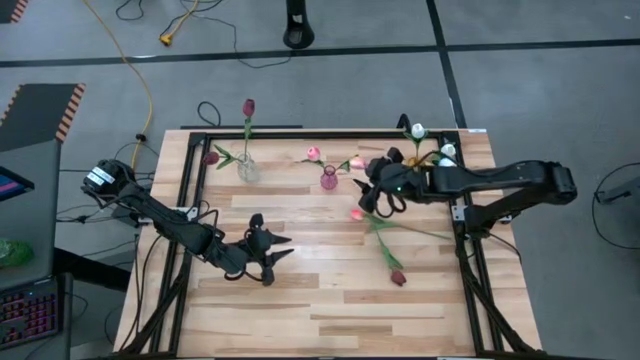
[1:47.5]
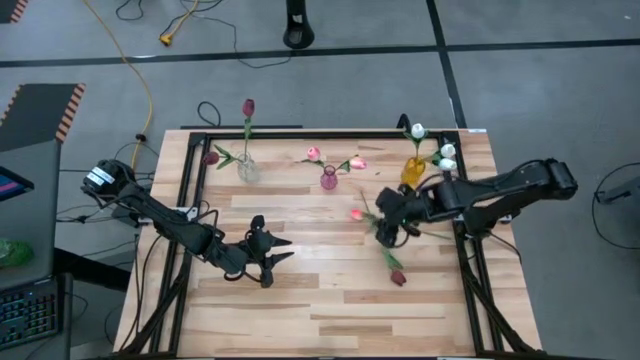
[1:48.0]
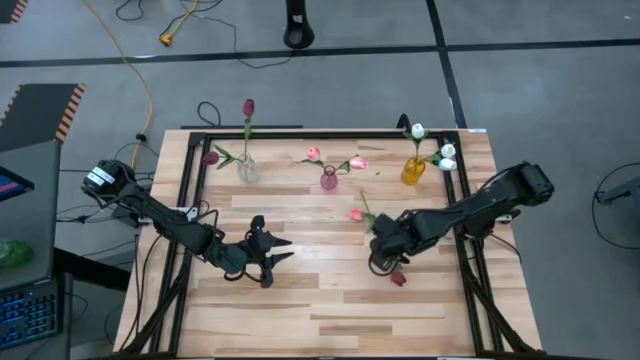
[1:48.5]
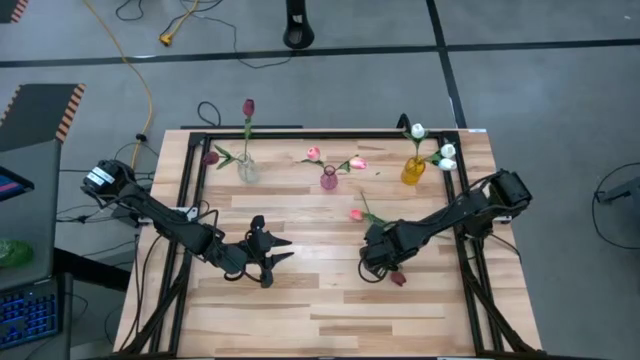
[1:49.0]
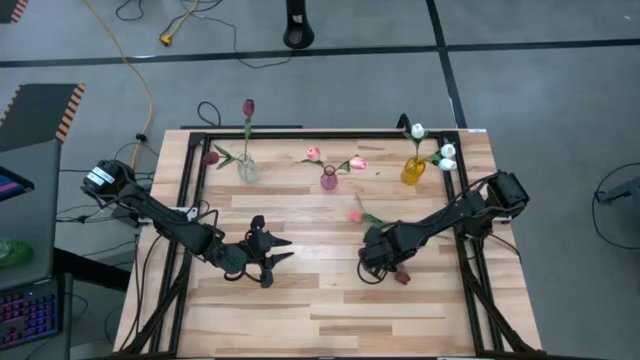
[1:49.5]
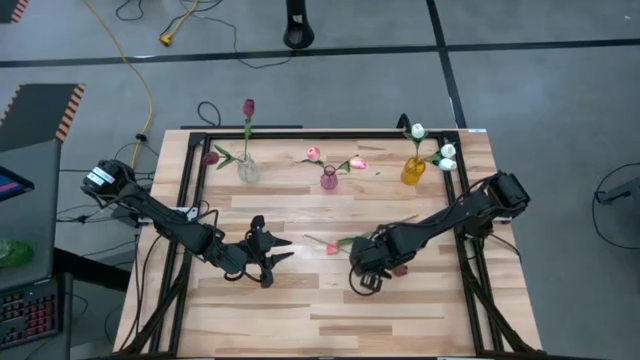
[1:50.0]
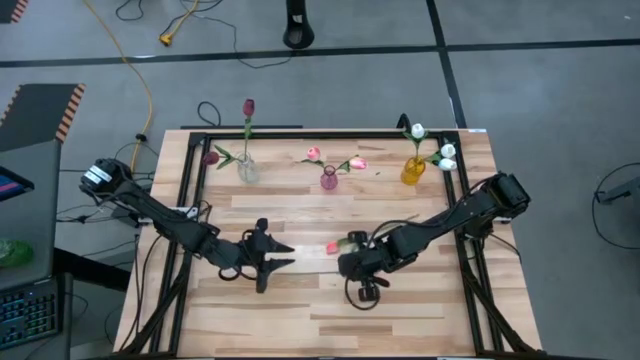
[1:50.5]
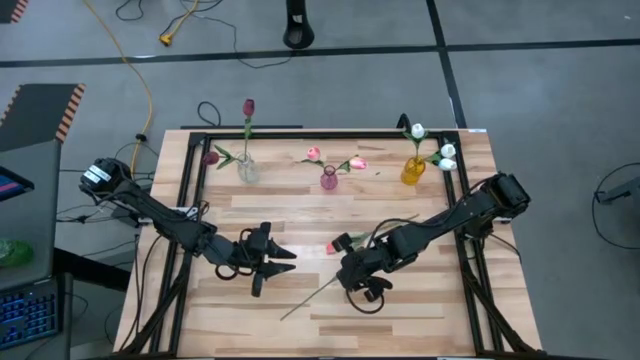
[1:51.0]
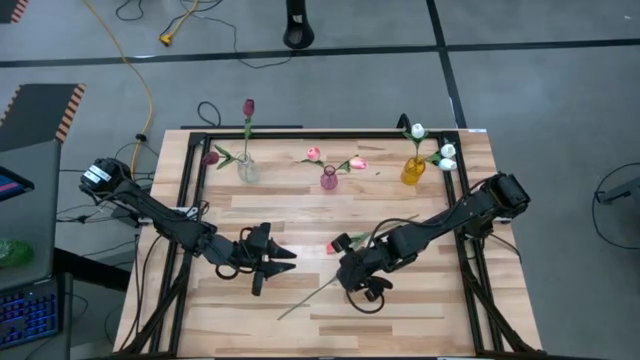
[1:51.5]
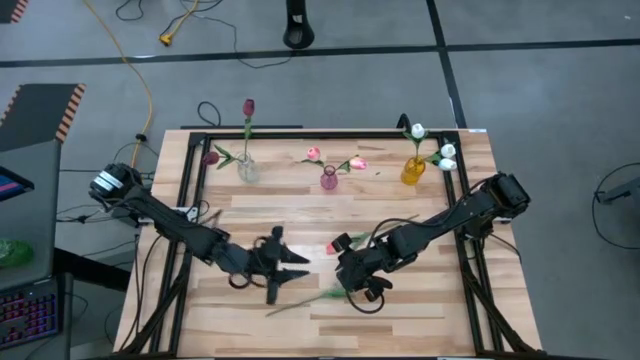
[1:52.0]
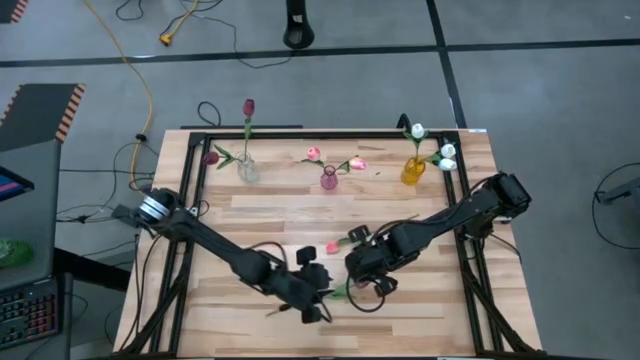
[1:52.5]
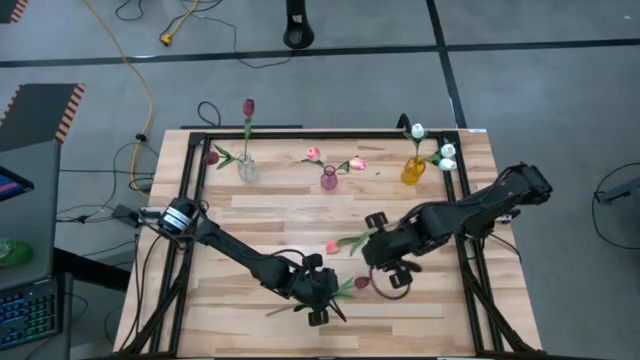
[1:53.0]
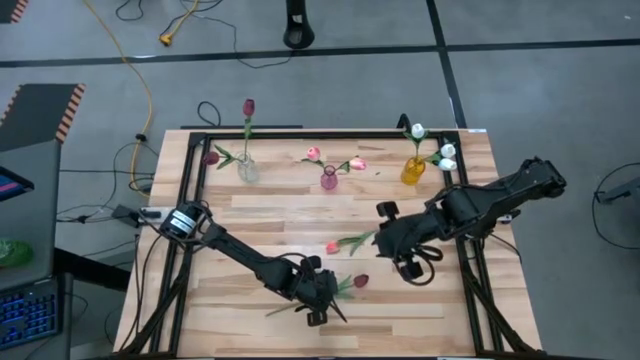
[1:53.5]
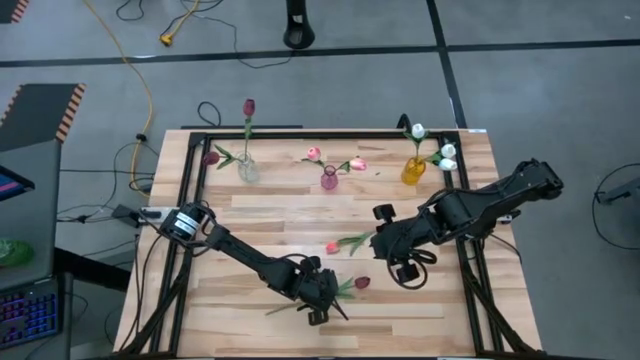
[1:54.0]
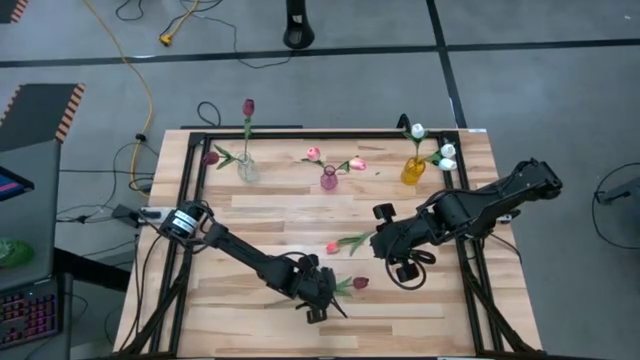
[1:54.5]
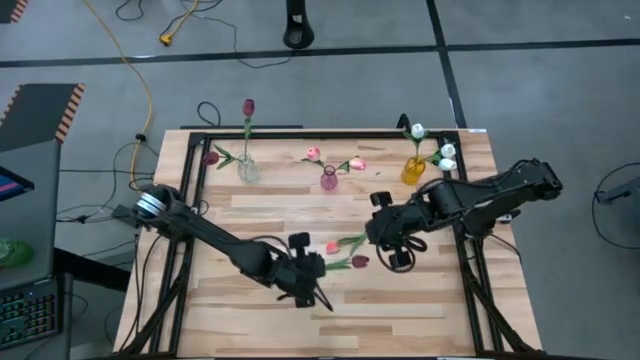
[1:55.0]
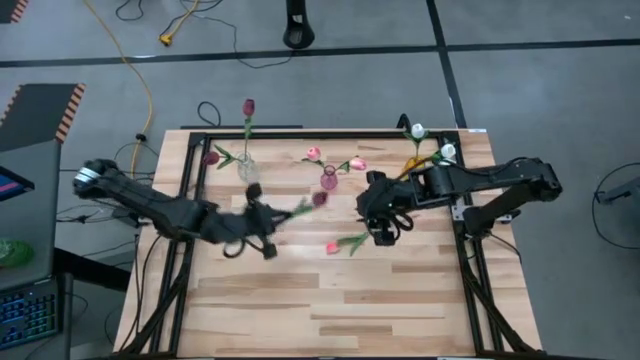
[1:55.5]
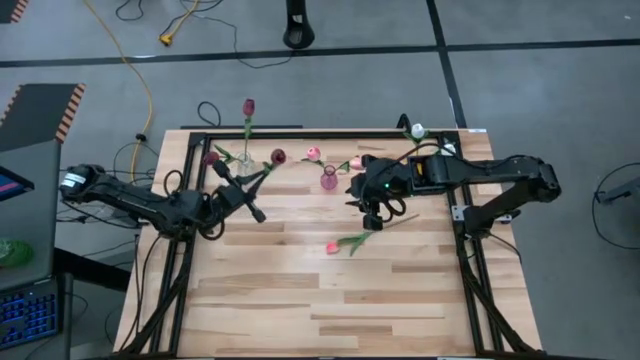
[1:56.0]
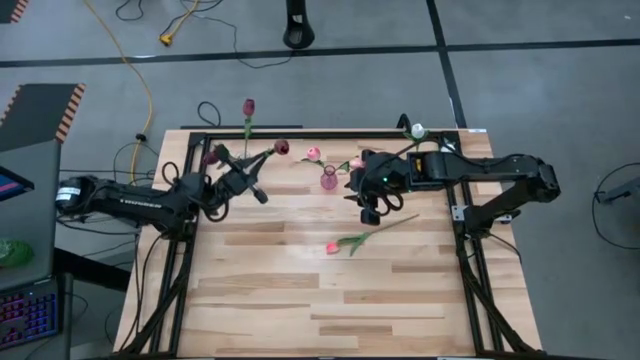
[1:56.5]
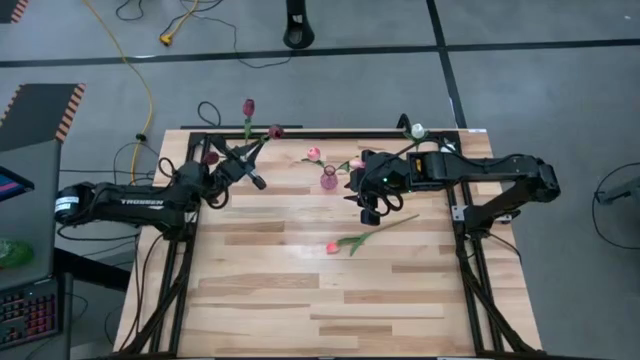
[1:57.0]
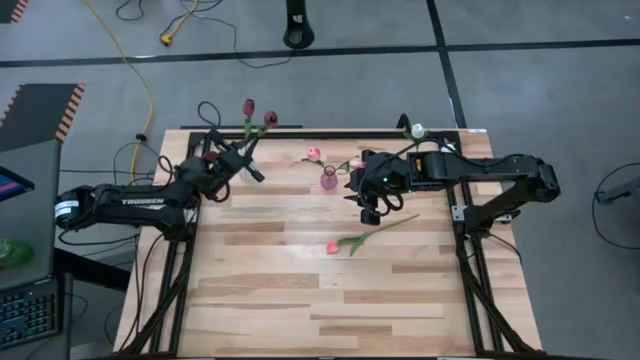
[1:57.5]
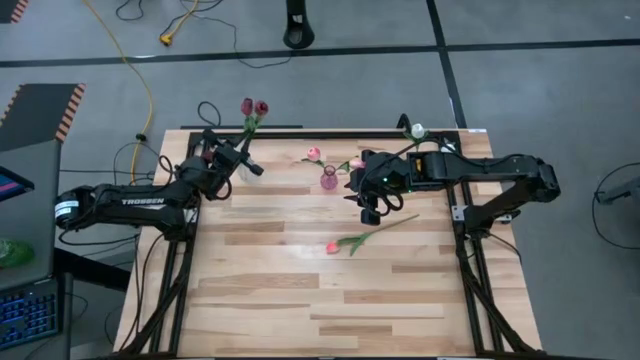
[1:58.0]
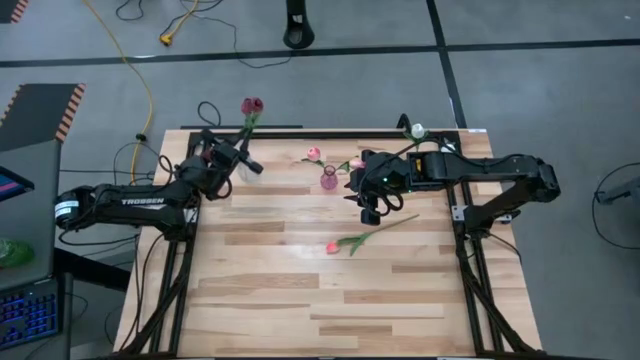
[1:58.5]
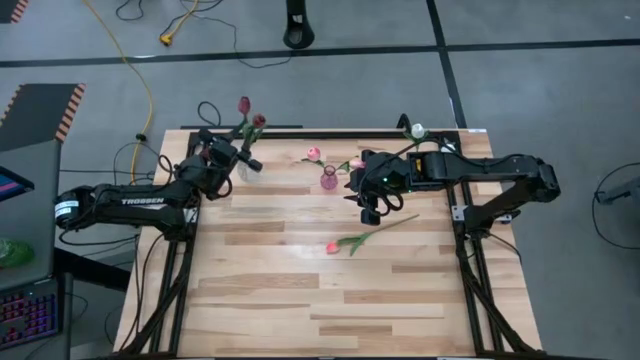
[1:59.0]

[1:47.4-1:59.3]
Task: Sort flowers into vase by color
Put the red flower into the transparent vase

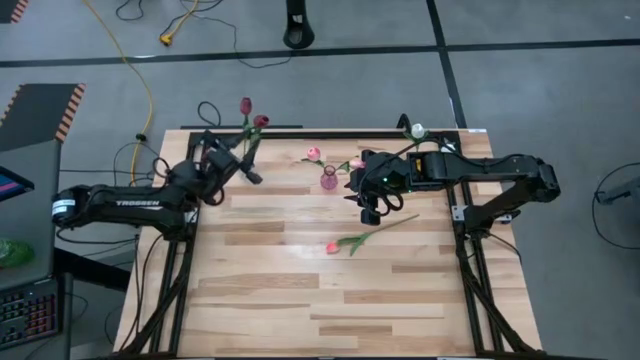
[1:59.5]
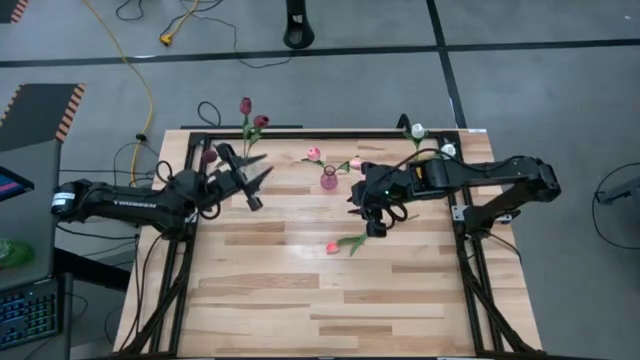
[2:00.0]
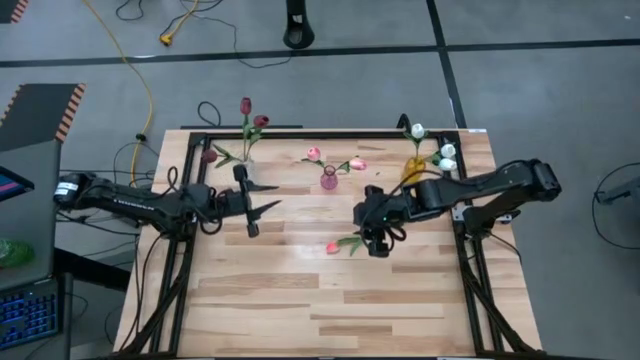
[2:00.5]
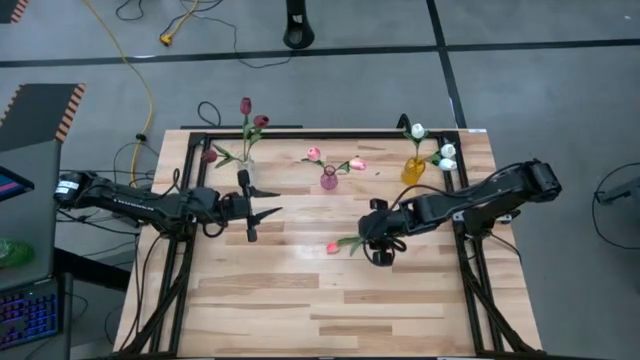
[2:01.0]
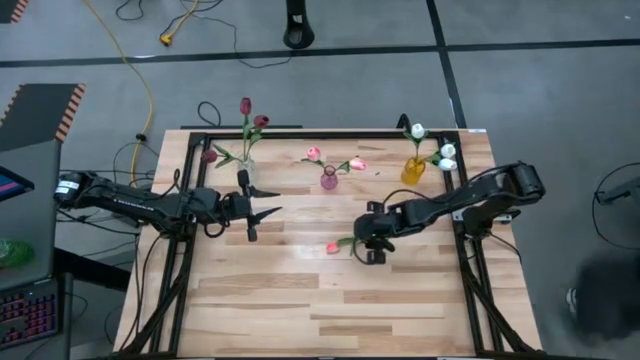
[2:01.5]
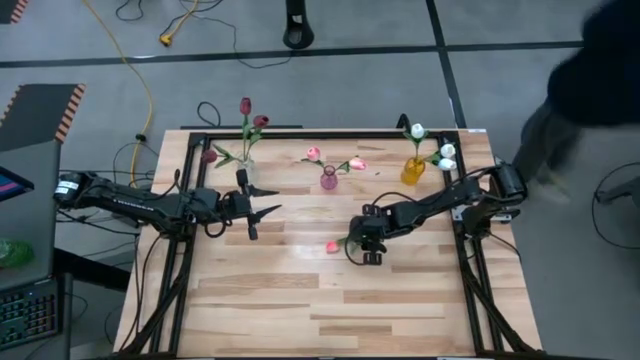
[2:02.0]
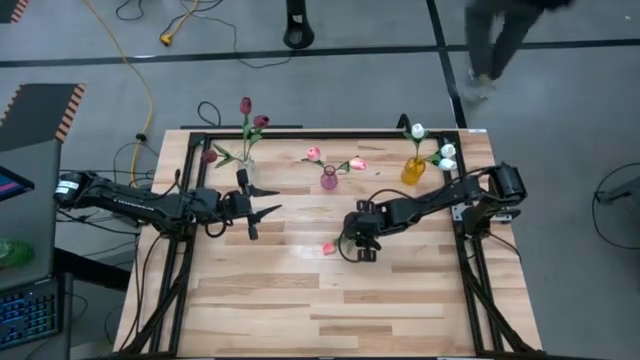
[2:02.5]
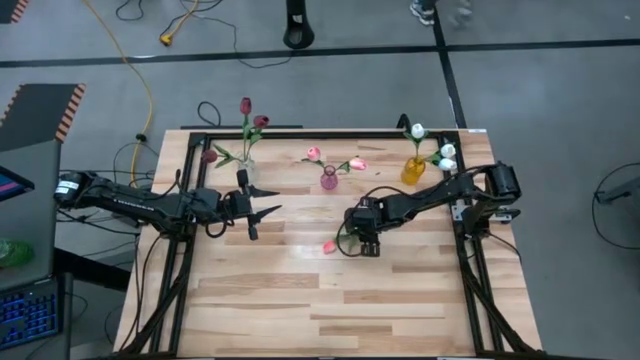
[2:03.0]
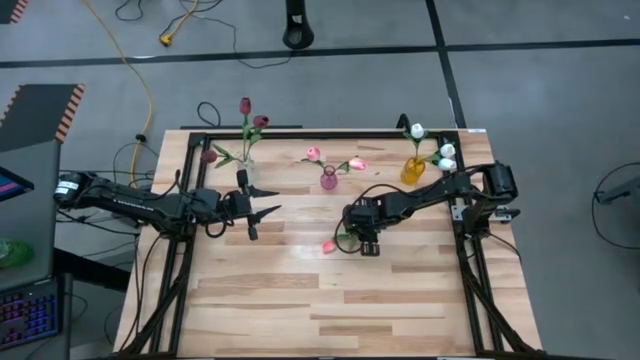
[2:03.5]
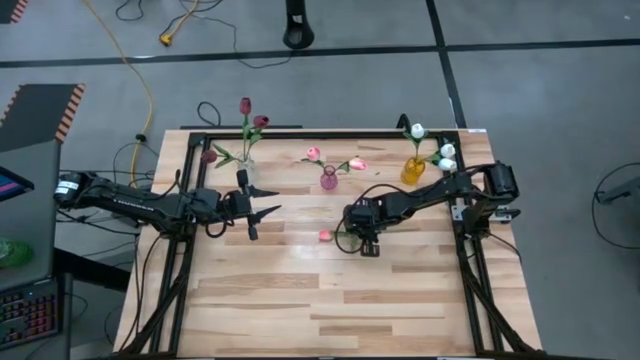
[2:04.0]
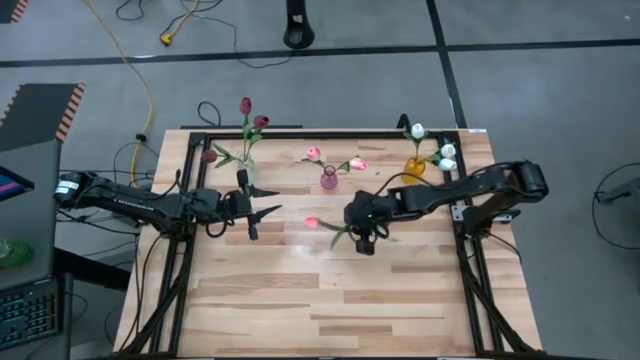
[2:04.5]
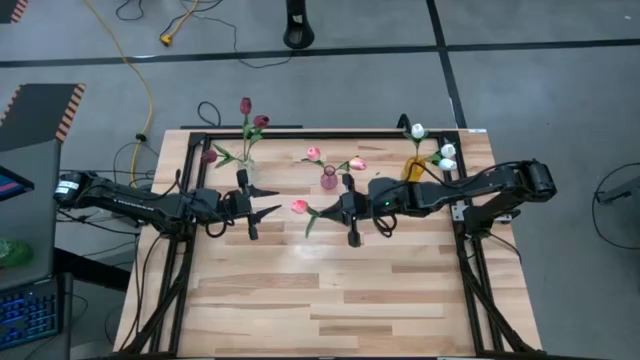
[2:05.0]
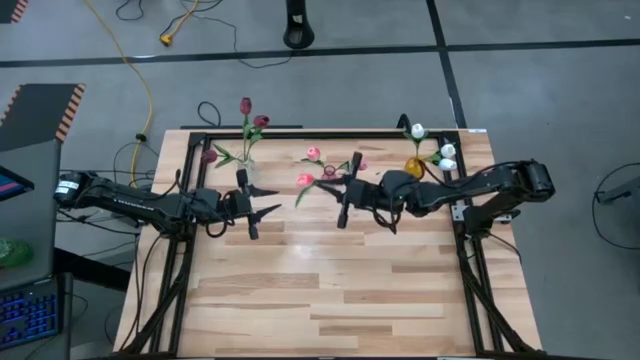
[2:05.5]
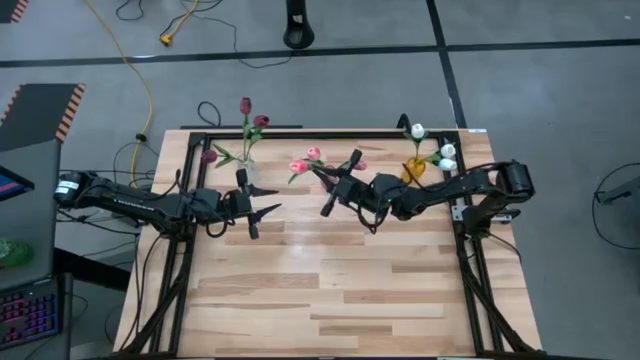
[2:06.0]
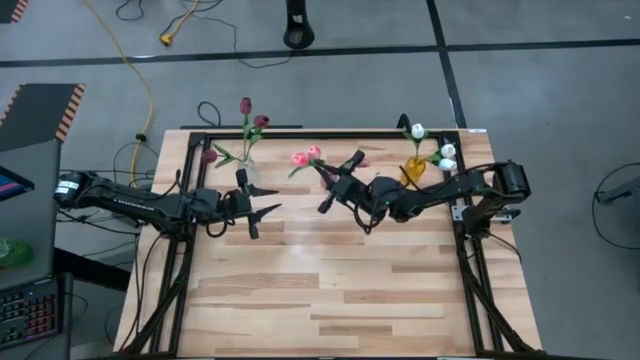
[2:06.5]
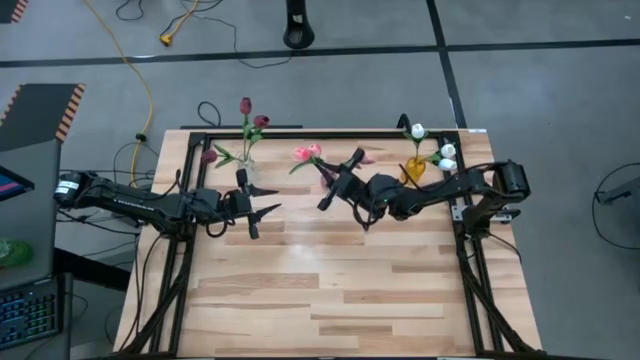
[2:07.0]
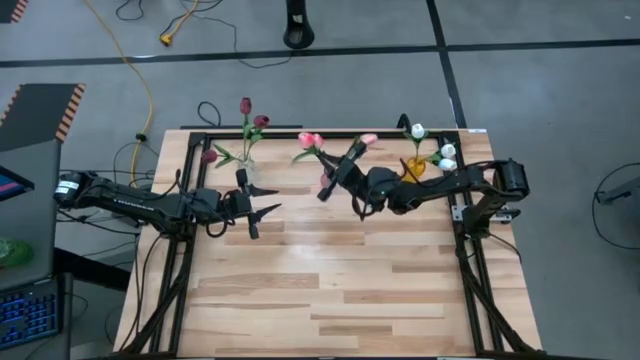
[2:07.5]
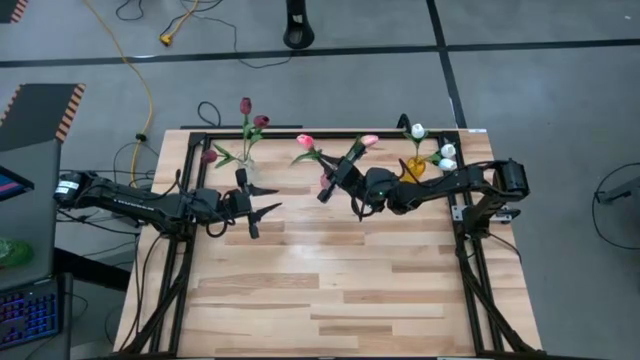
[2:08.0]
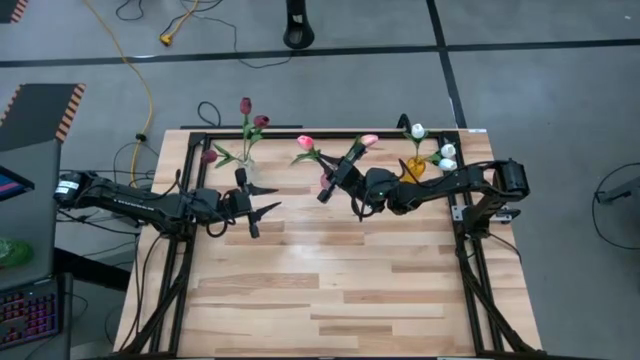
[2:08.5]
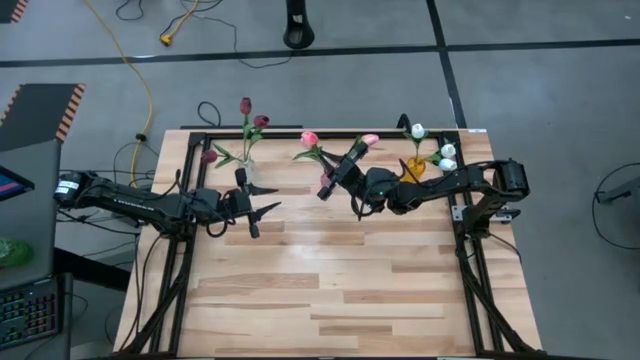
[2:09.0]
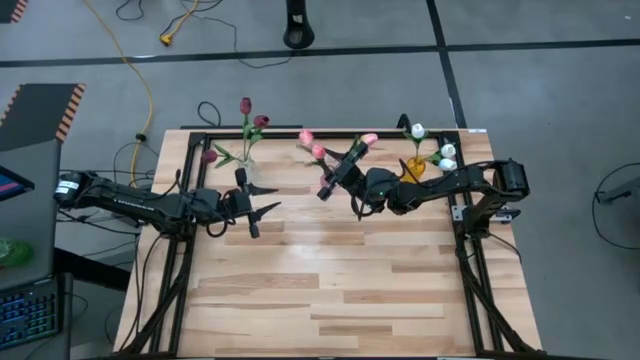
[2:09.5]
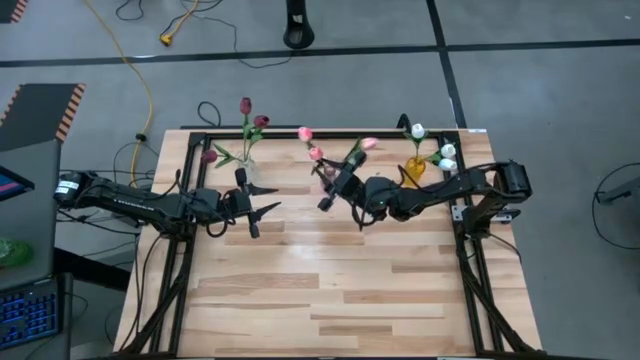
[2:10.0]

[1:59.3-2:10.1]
Put the pink flower into the purple vase
